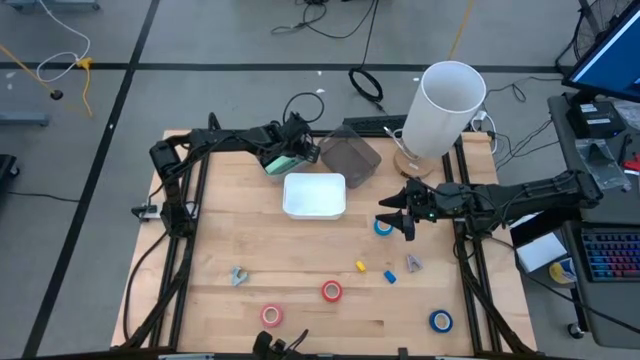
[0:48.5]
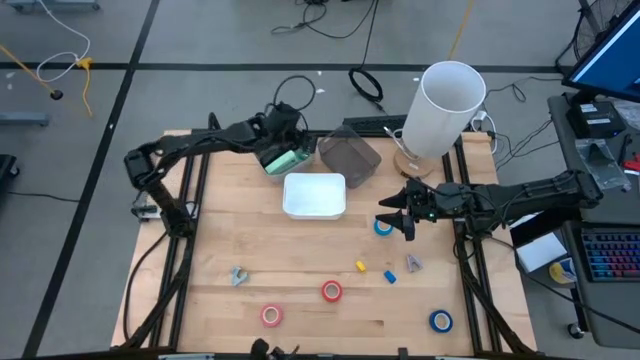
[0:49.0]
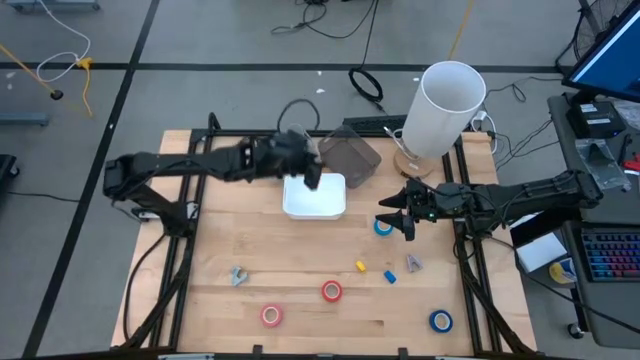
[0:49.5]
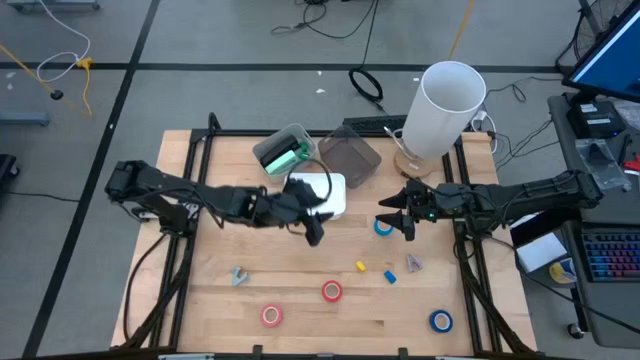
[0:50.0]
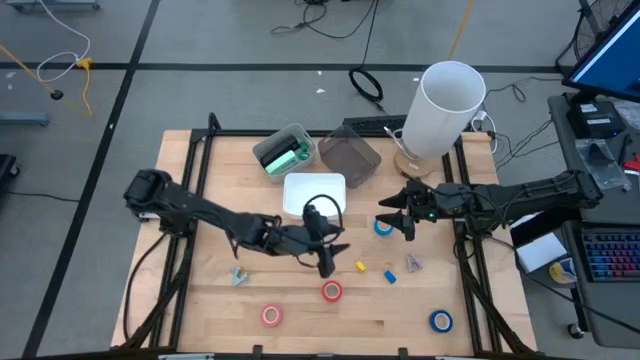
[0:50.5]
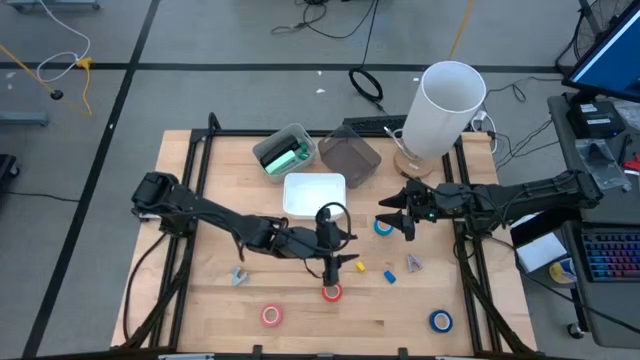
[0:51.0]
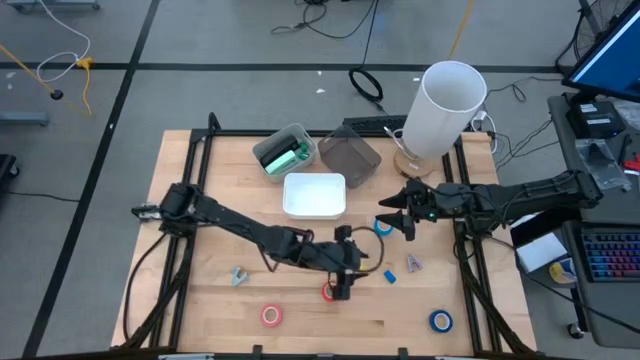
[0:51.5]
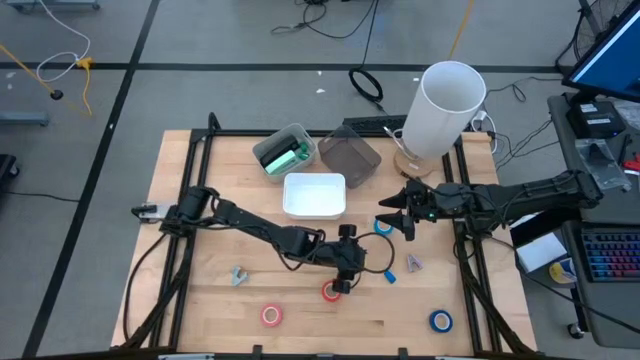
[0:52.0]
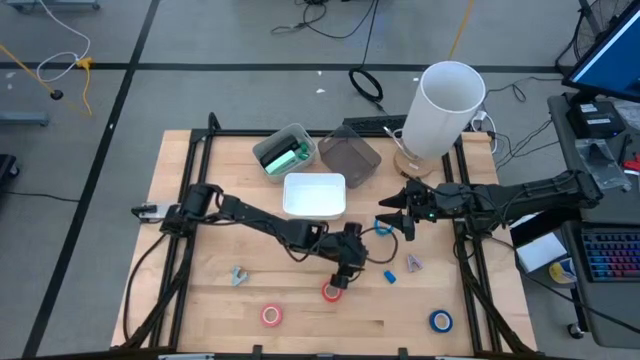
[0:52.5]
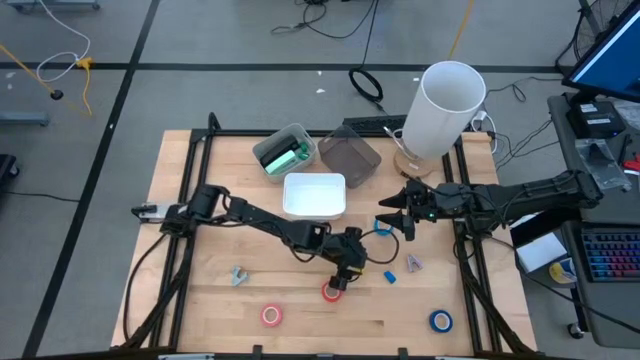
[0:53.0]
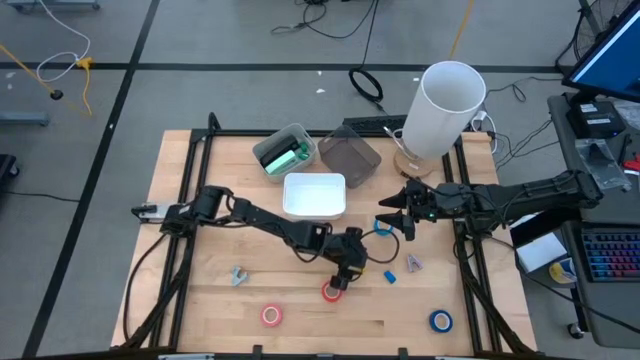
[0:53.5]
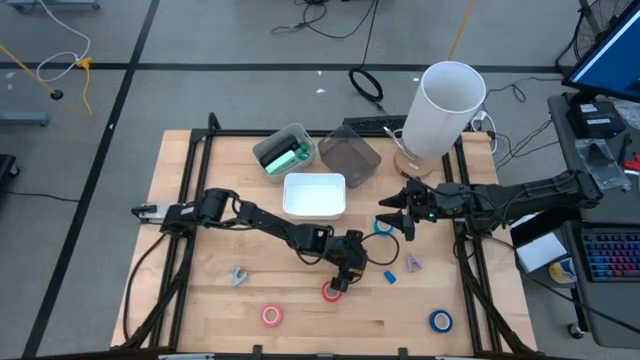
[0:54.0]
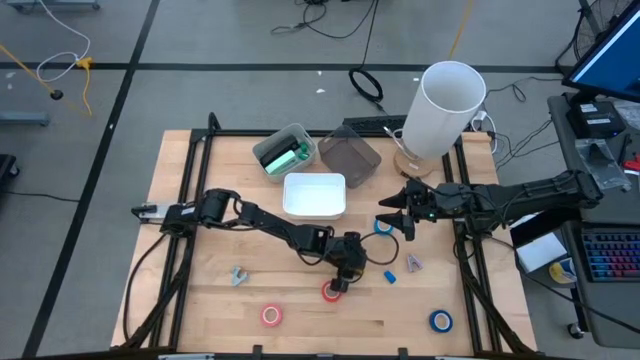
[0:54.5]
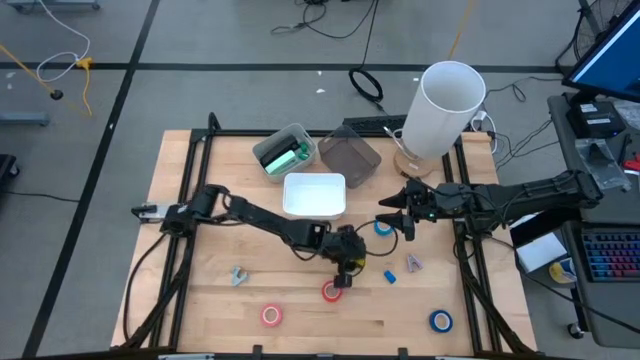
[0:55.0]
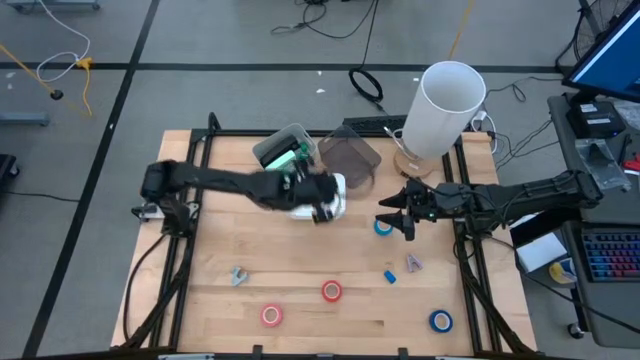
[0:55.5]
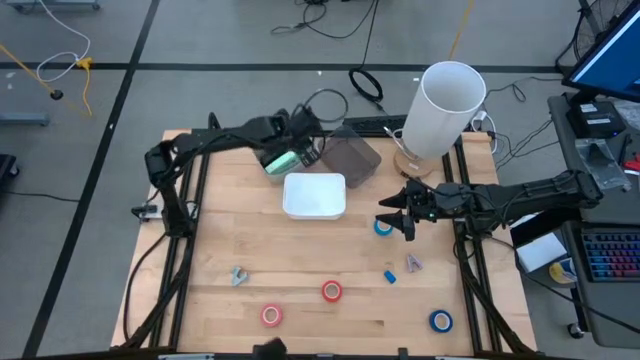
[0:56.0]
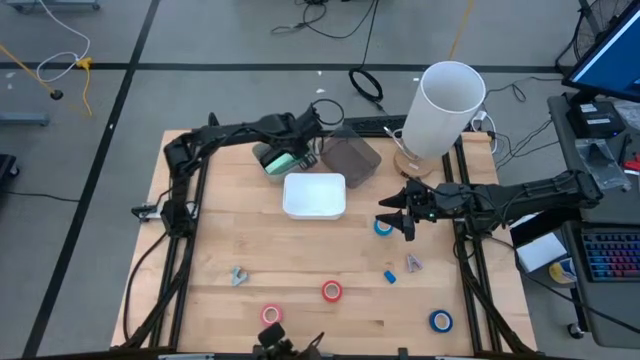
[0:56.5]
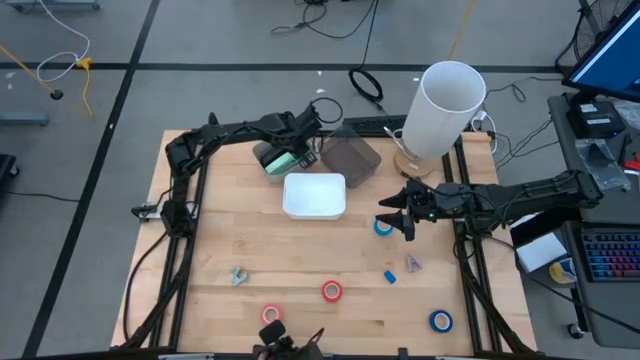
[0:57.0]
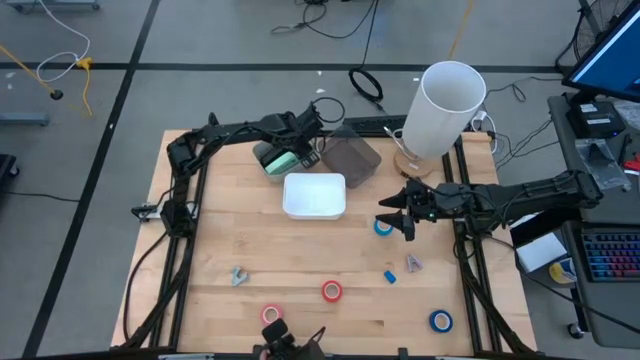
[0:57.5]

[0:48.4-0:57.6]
Task: Pick and place Stapler, Stapler remover, tape
Put the yellow stapler into the gray bin

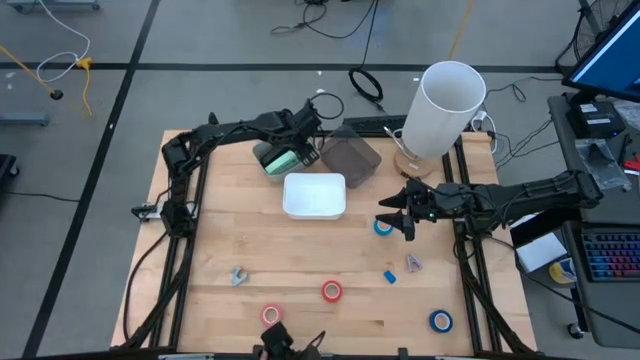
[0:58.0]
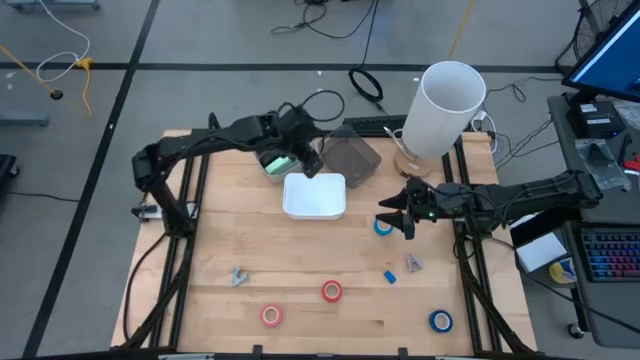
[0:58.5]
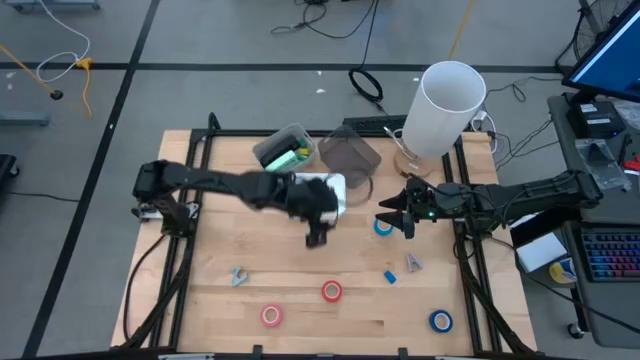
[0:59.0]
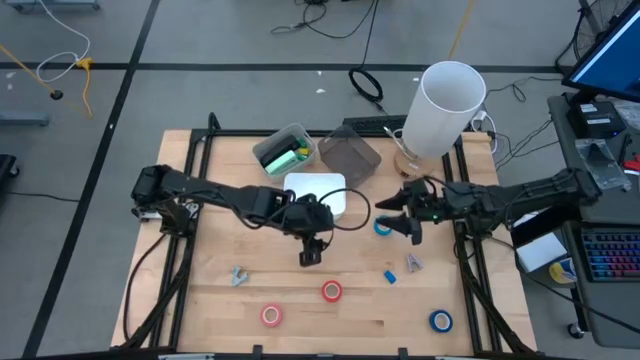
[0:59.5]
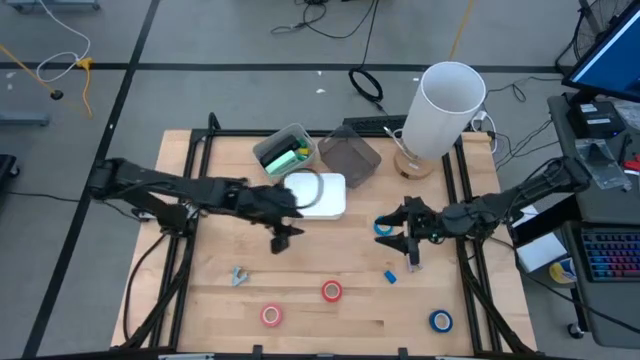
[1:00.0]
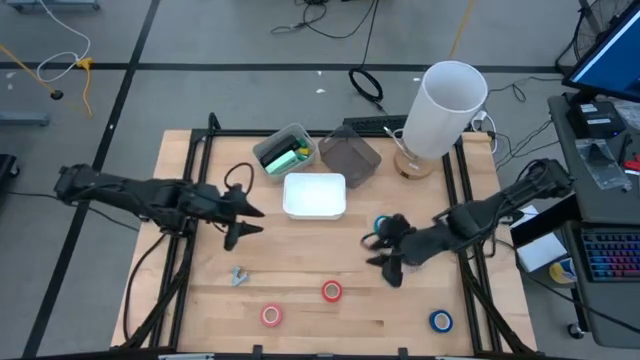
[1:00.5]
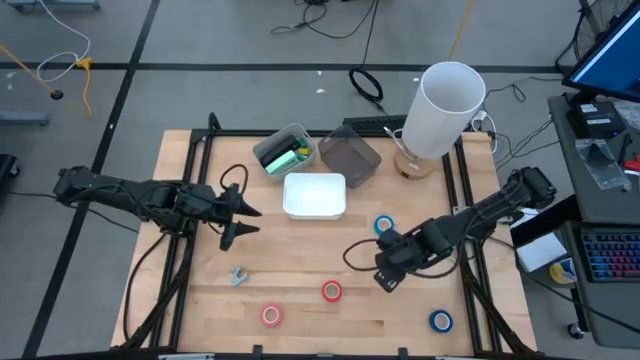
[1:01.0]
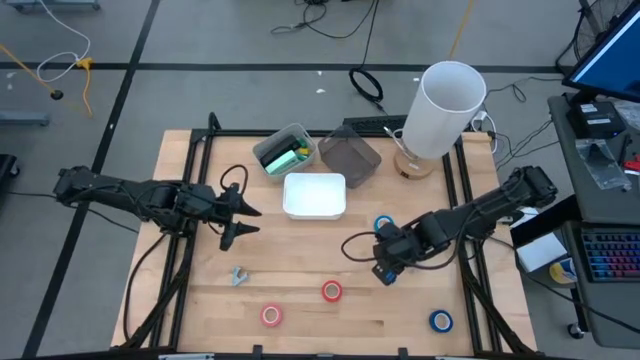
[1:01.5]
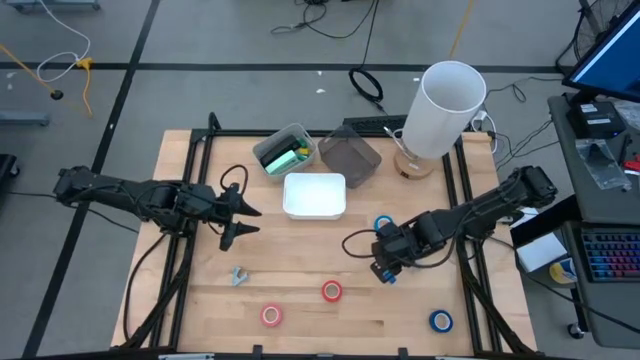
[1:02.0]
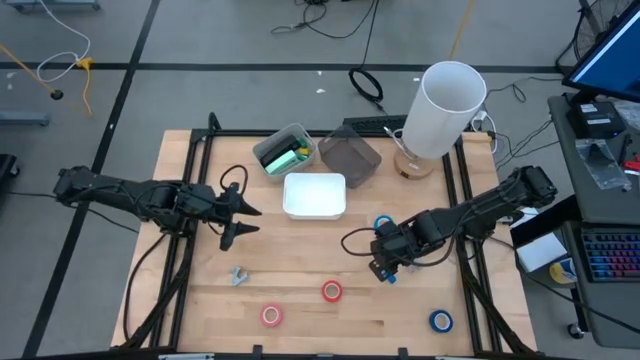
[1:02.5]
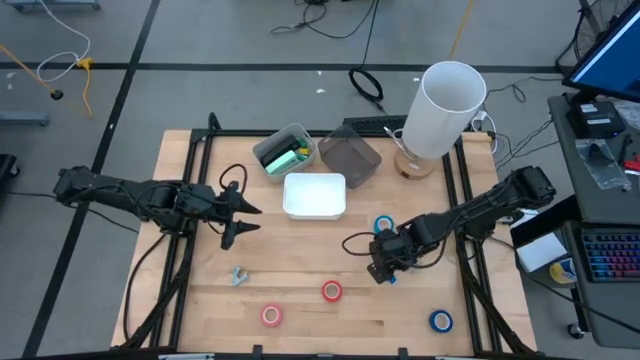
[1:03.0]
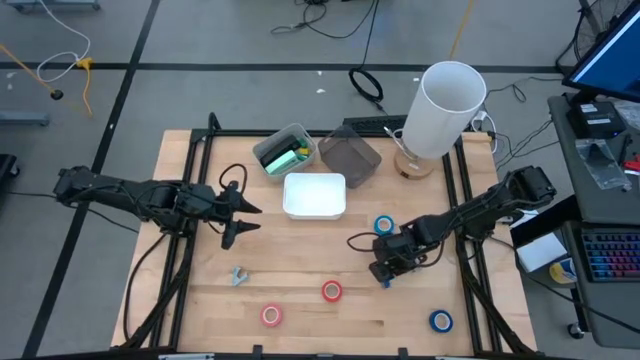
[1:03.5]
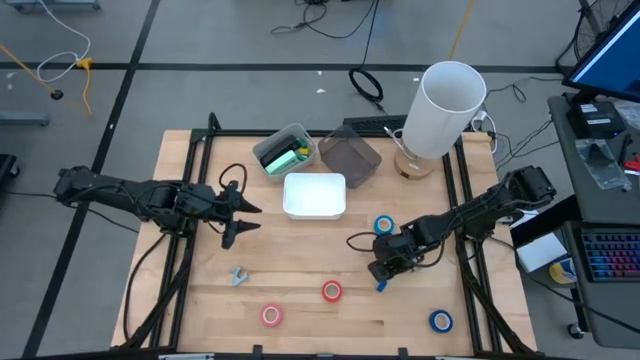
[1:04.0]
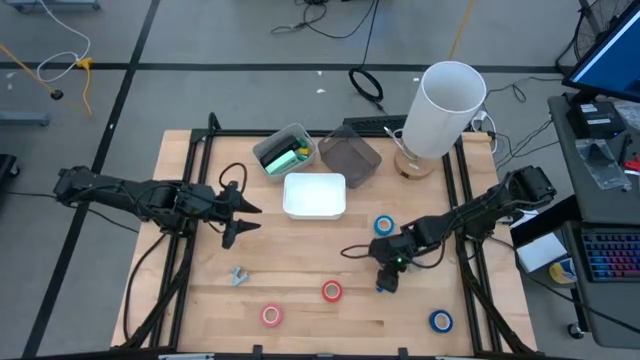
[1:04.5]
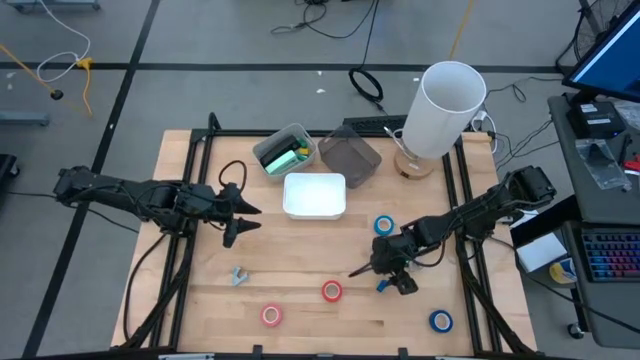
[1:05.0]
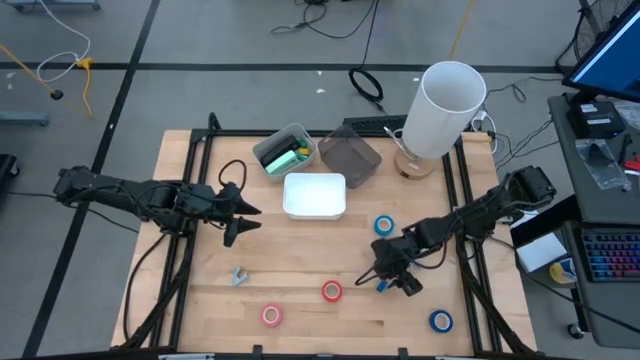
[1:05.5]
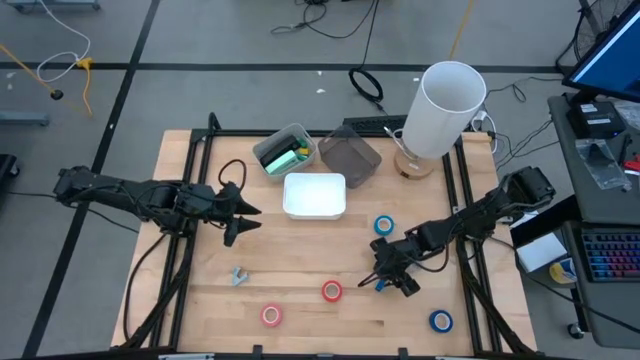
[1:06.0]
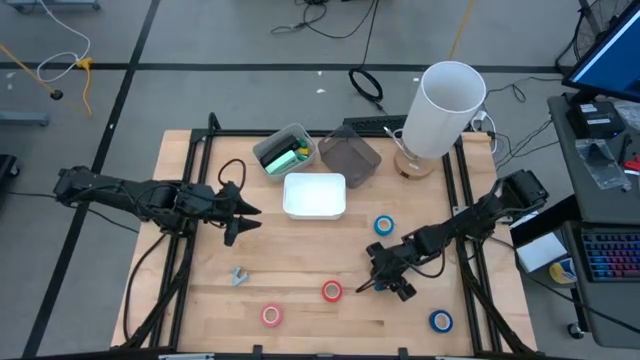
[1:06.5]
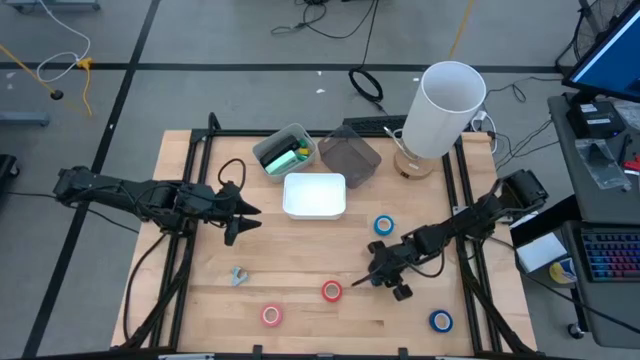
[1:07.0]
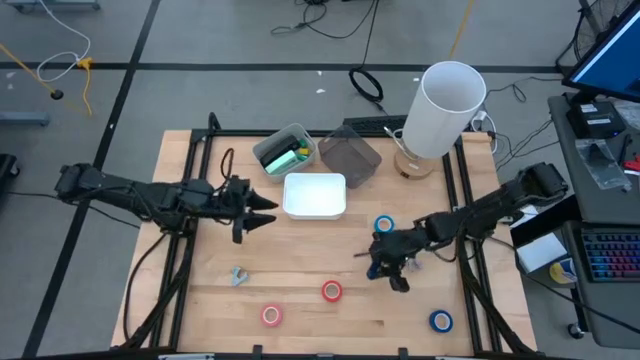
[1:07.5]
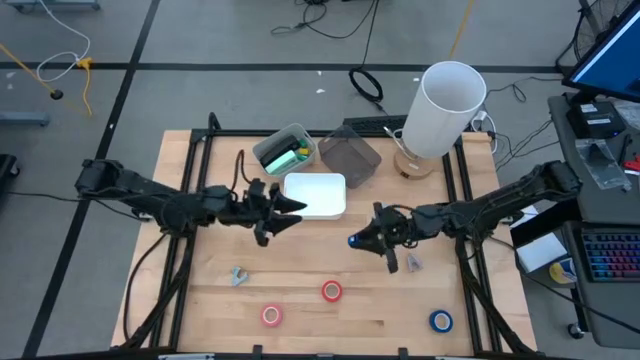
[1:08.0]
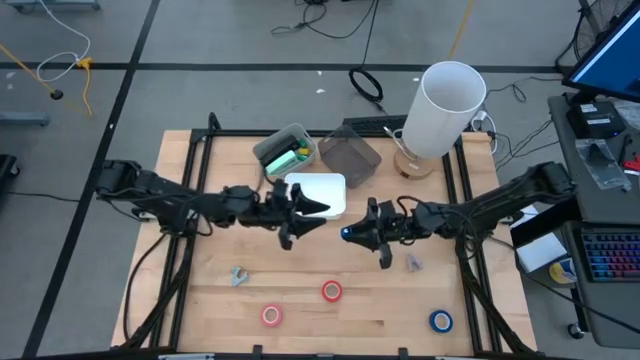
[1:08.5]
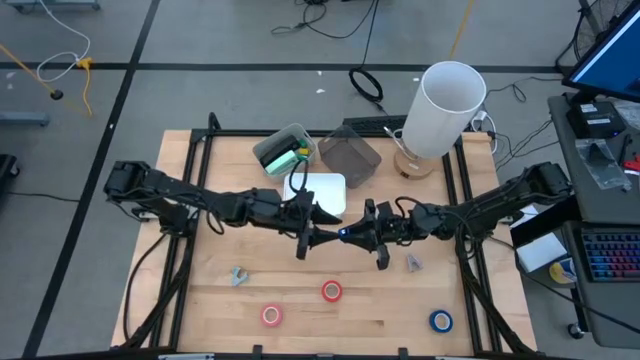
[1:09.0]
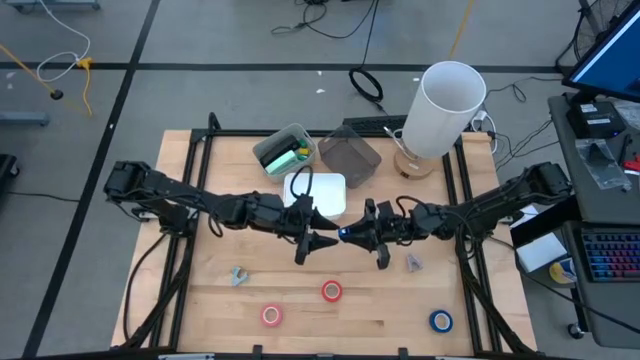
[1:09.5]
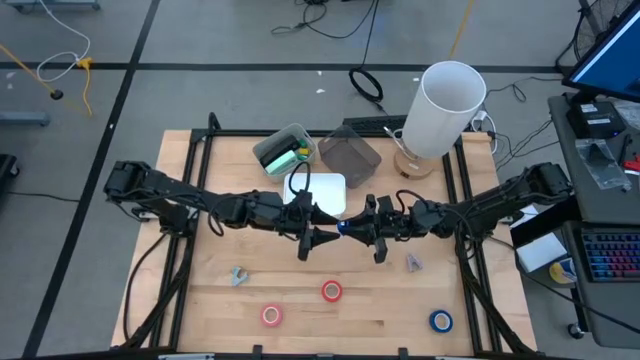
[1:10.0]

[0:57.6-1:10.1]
Put the blue stapler into the gray bin
